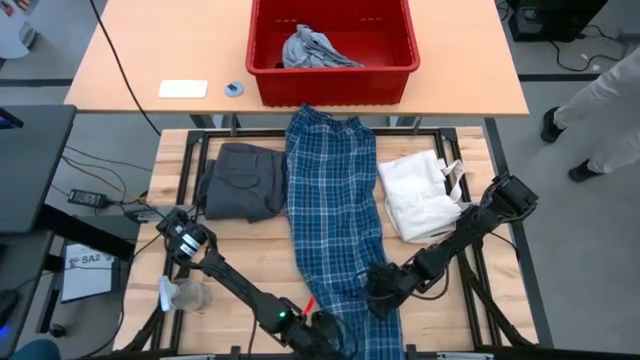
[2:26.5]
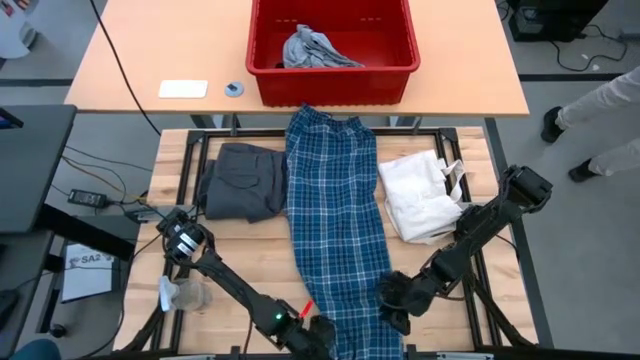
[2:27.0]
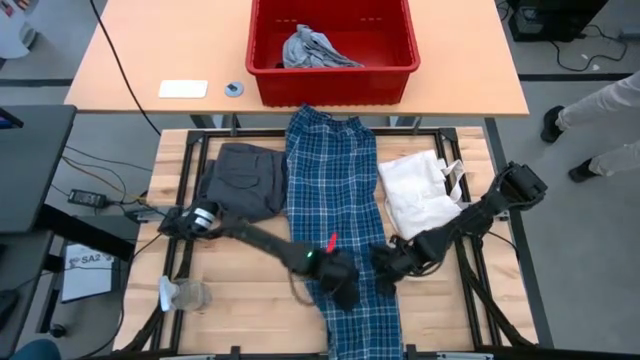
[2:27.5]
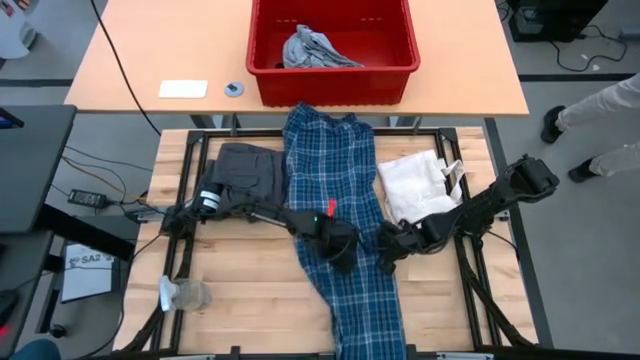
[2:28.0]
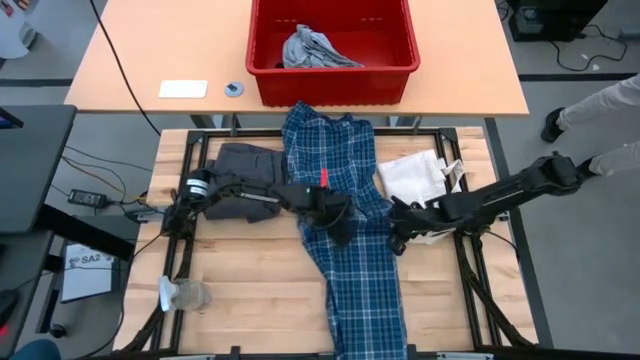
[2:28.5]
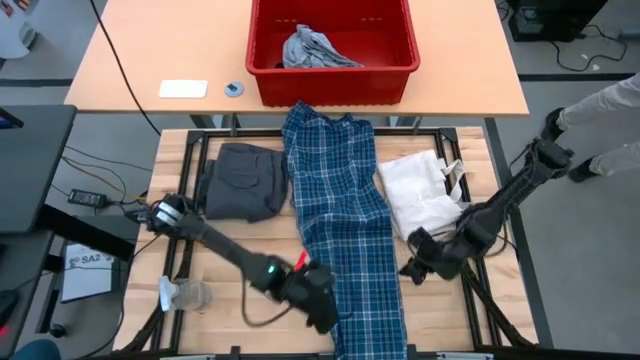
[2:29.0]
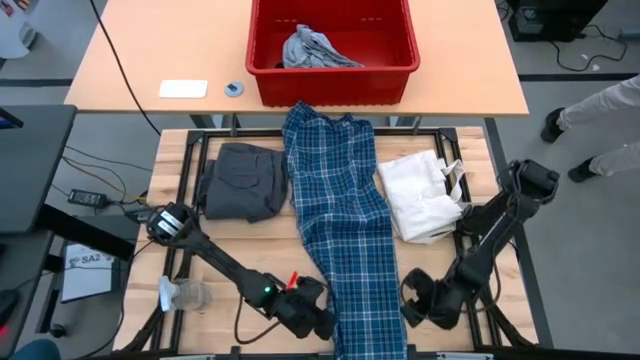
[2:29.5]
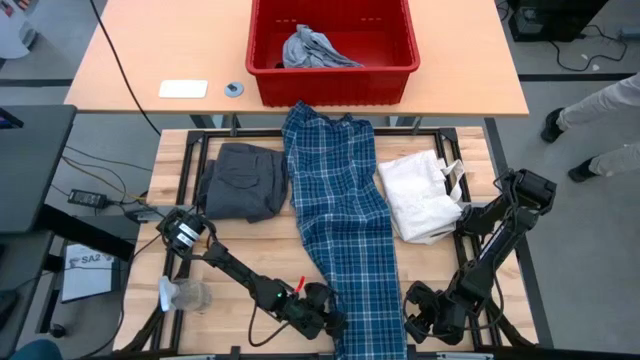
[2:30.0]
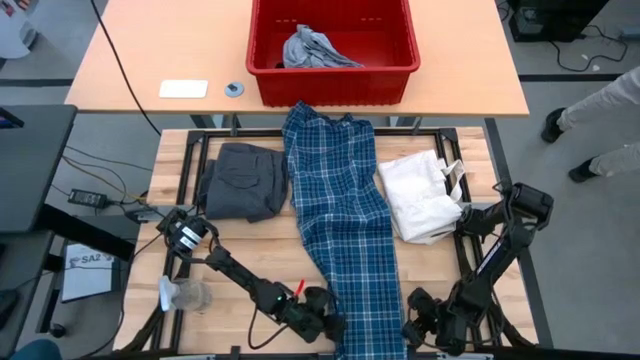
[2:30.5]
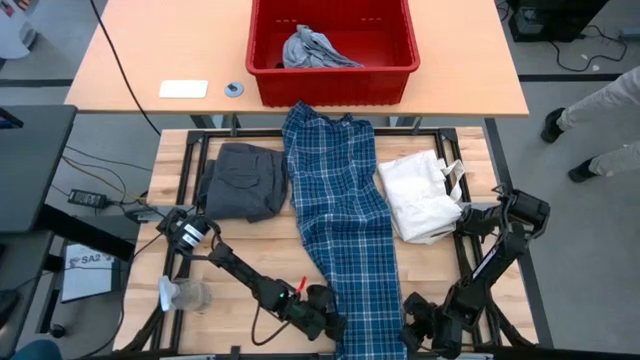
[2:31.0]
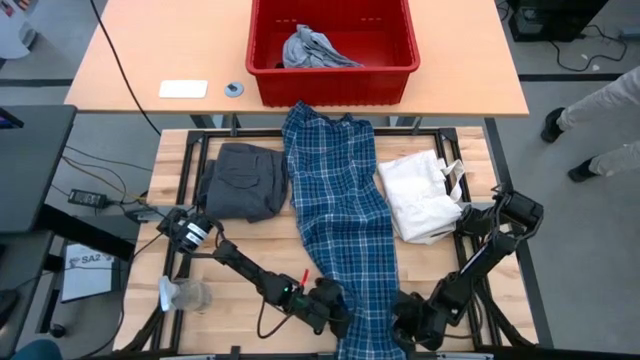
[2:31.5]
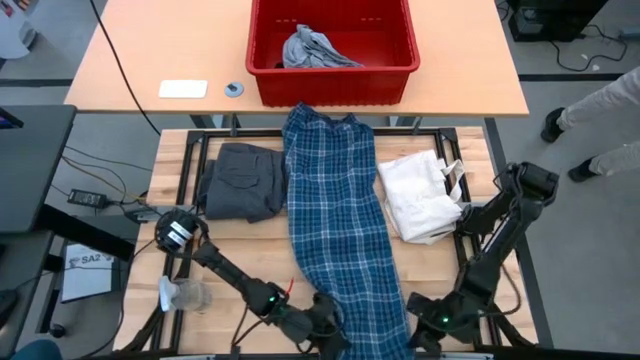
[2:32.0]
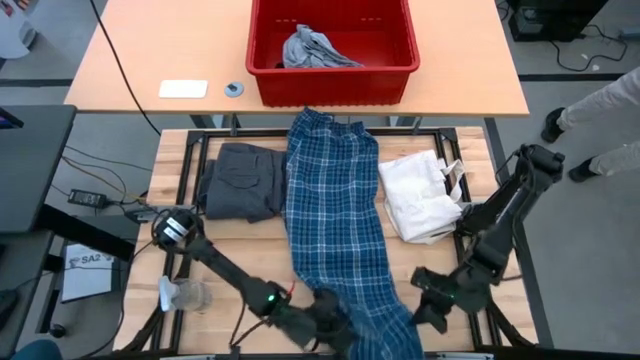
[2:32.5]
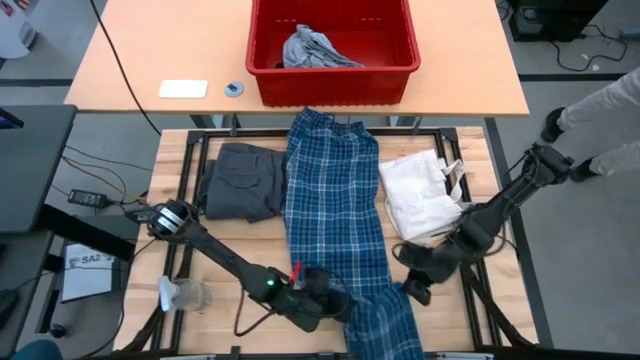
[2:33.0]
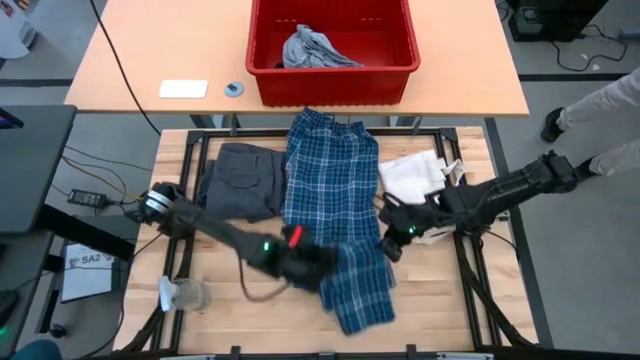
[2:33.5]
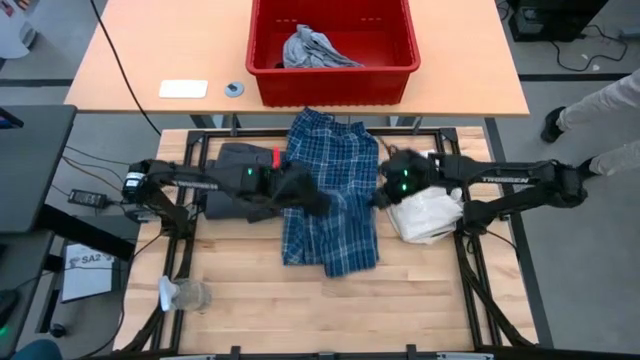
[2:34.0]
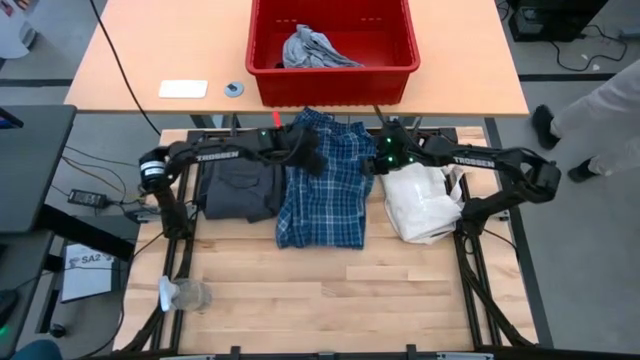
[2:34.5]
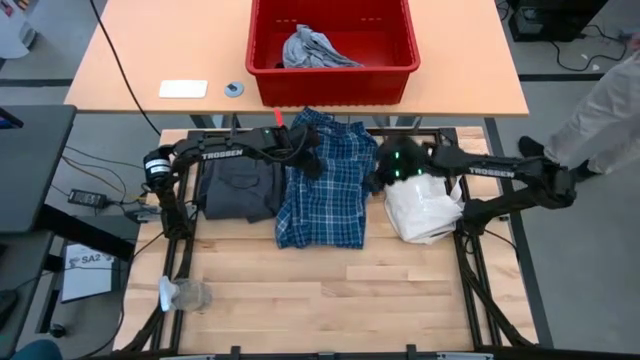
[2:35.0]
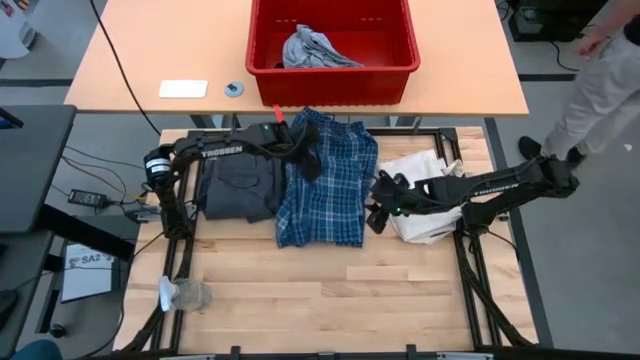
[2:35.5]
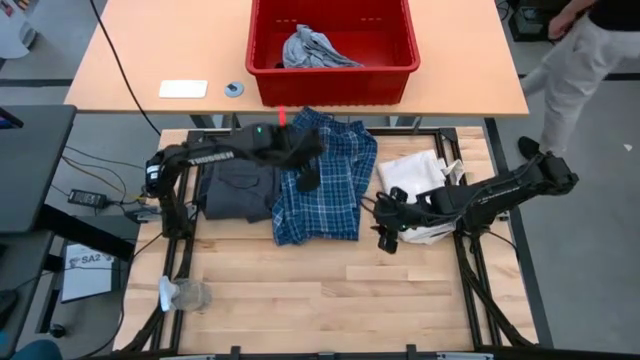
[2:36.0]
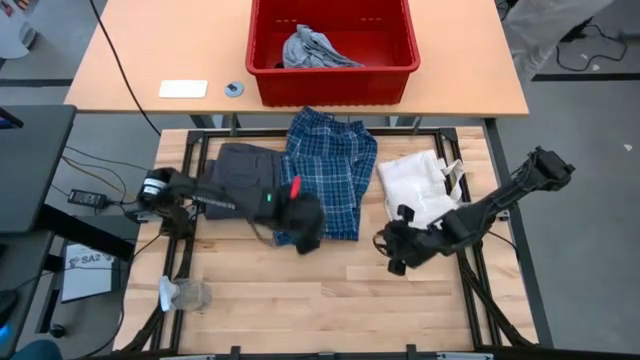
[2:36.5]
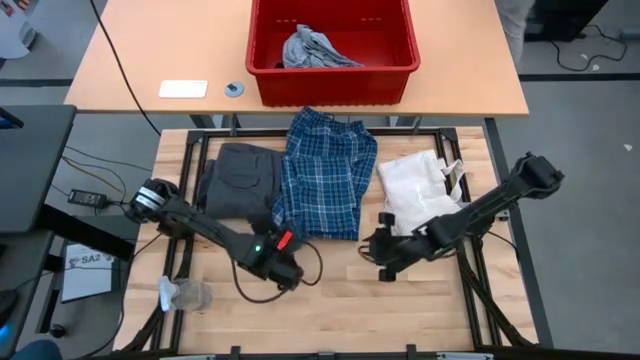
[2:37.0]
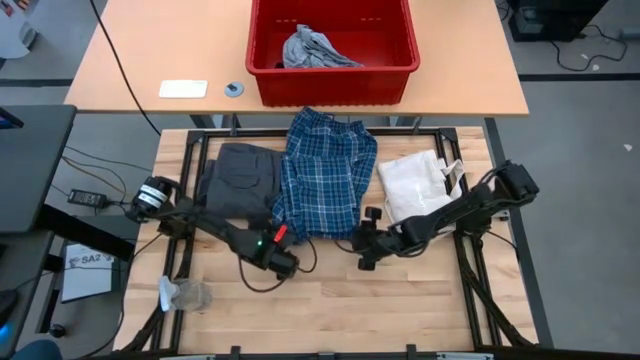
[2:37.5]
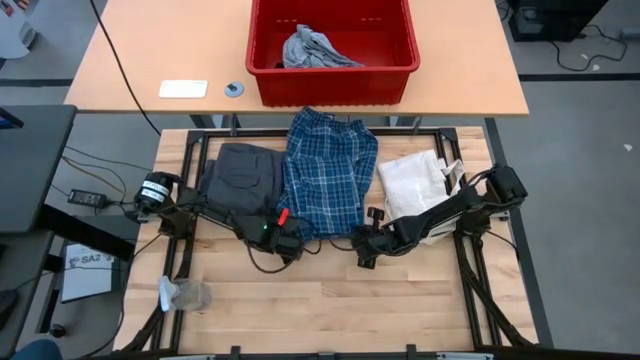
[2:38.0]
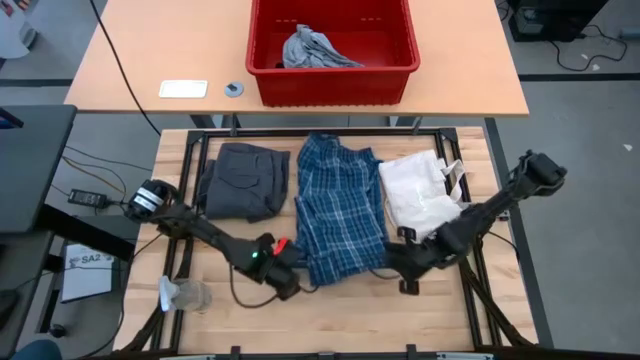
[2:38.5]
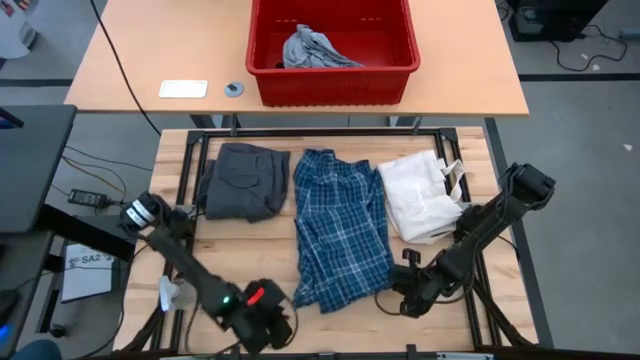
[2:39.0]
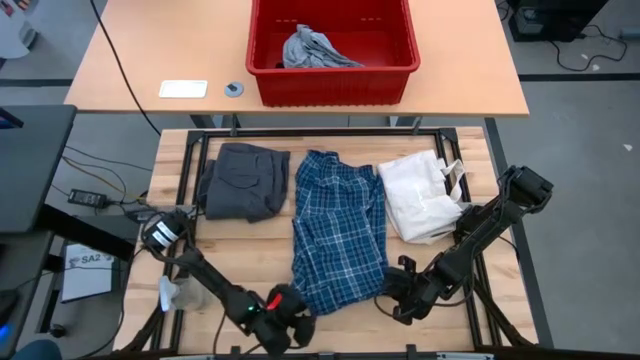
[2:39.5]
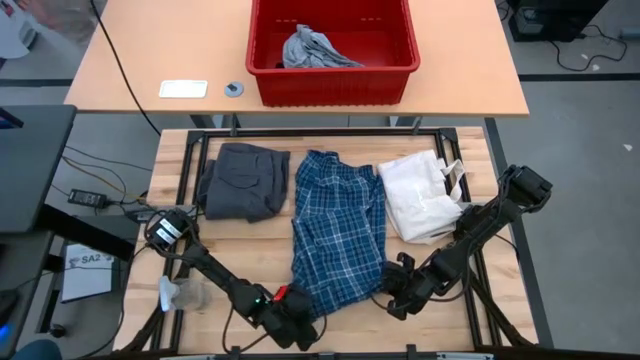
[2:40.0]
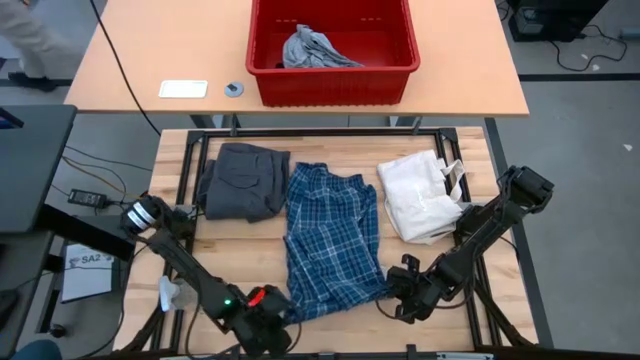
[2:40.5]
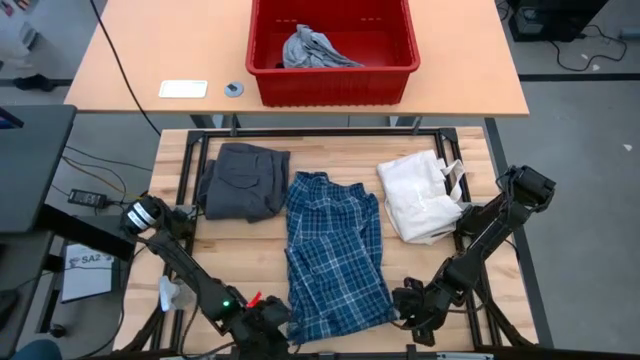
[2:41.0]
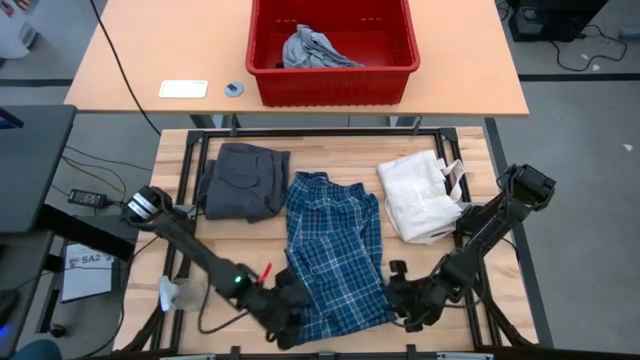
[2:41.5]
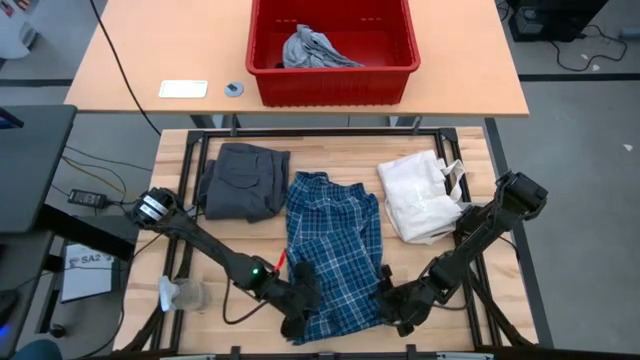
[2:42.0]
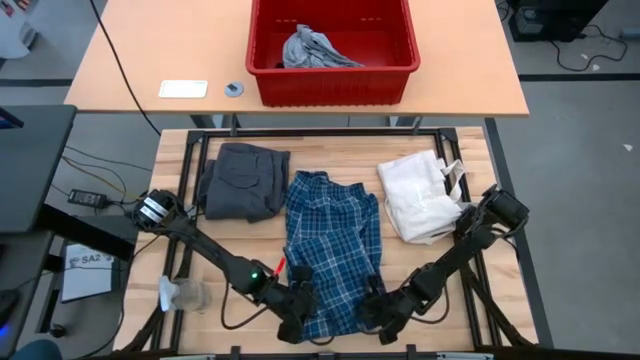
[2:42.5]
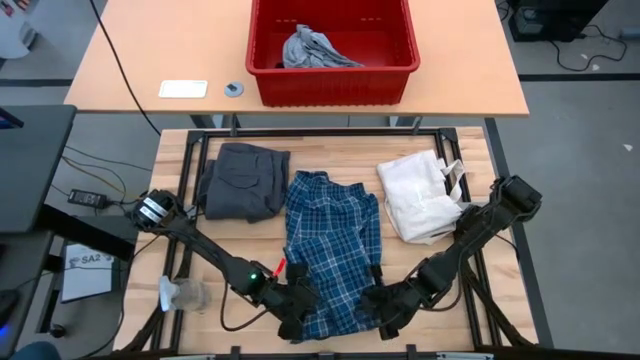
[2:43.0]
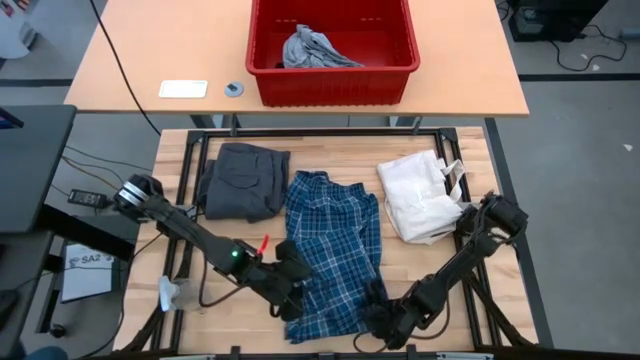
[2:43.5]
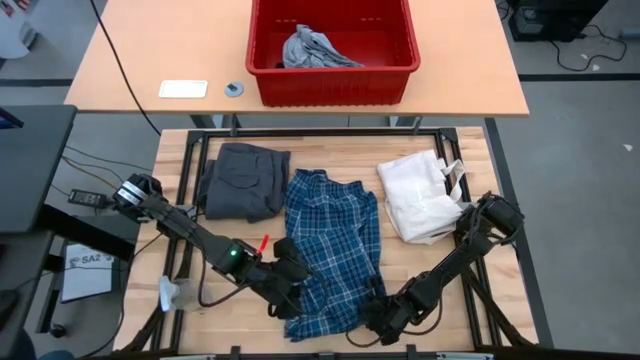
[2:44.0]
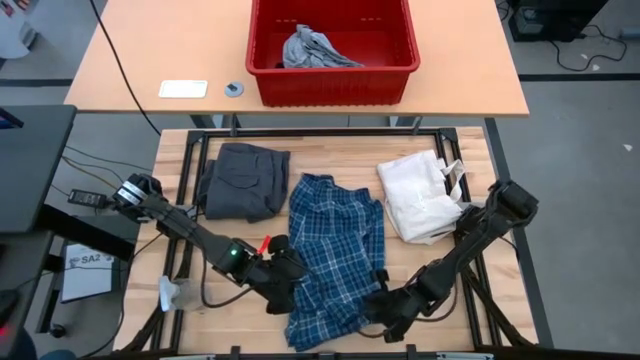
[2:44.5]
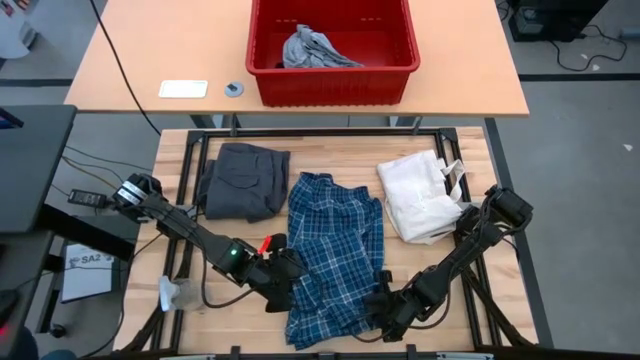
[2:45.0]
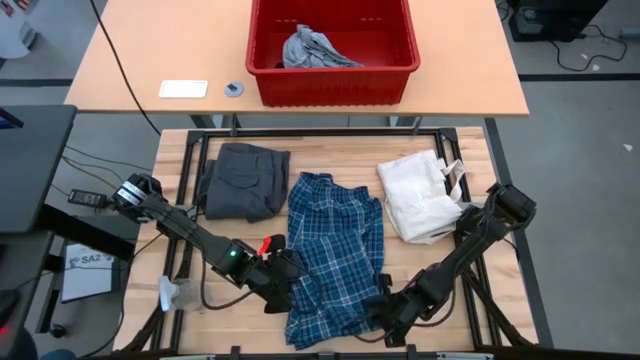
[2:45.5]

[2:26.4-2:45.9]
Task: Fold Laundry from Bin
Fold the plaid pants

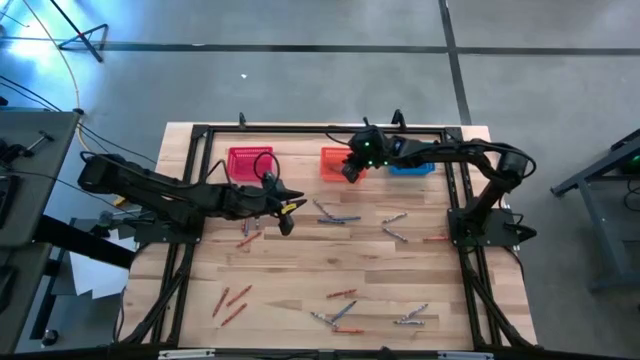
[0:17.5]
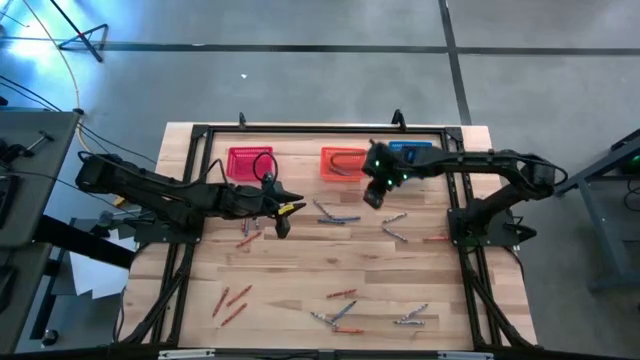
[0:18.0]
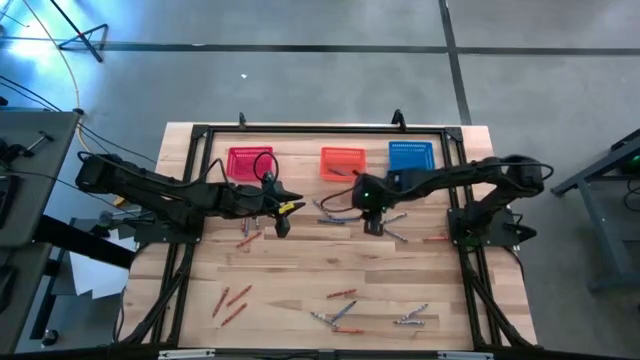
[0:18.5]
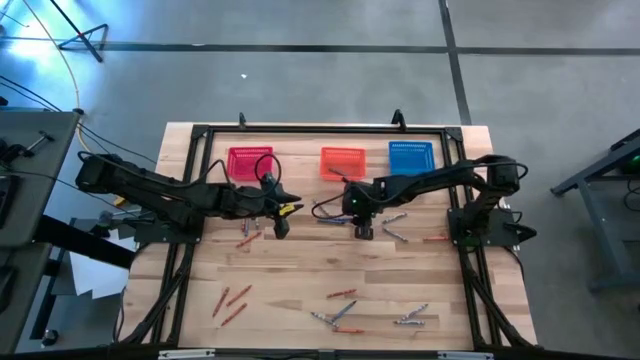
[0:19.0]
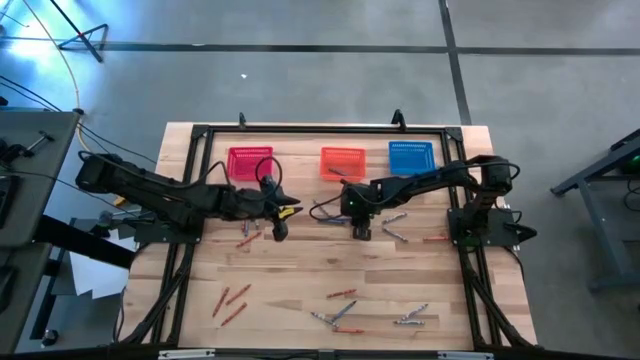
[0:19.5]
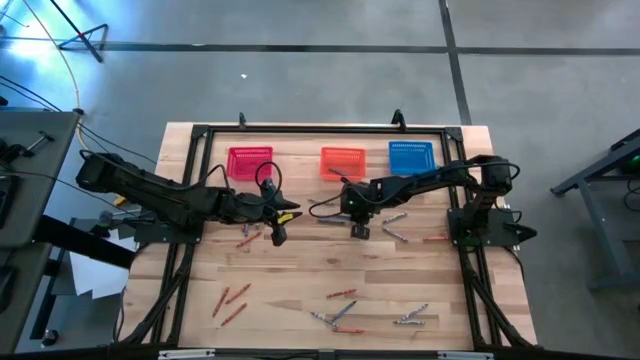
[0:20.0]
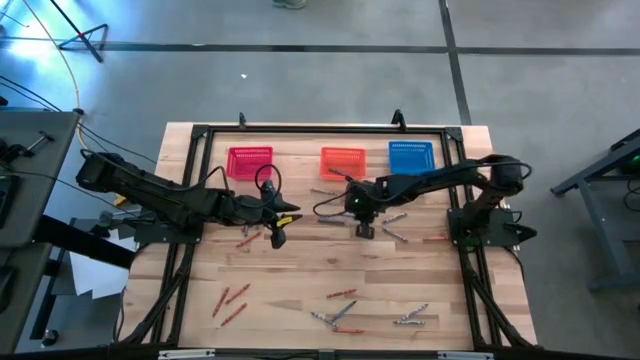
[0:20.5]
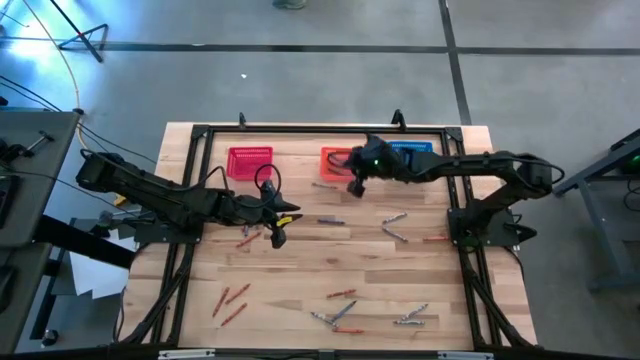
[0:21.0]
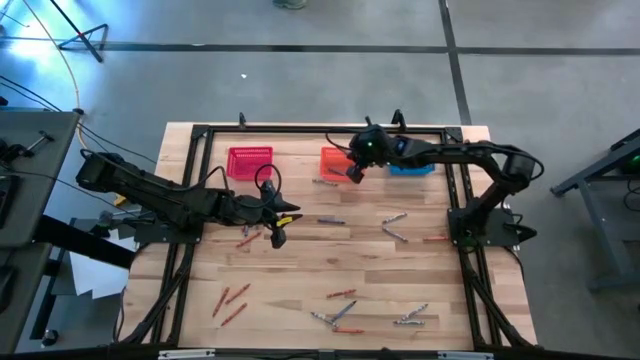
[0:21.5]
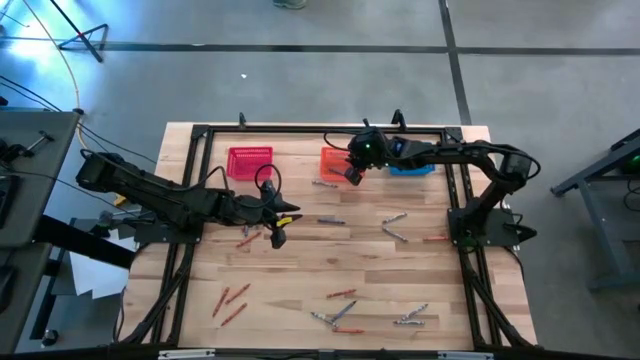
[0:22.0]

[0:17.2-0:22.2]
Task: Sort crayons
Put the blue crayon into the orange bin
